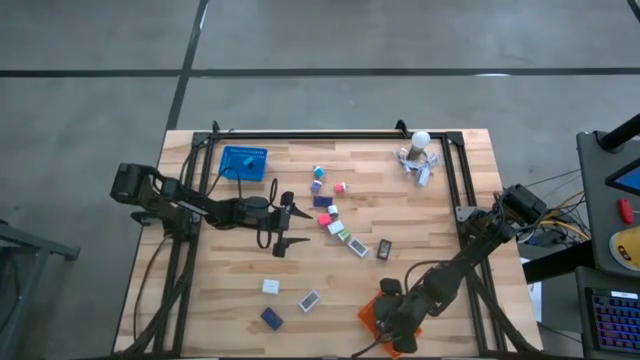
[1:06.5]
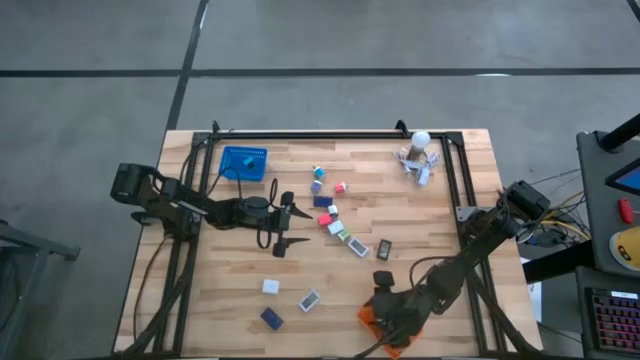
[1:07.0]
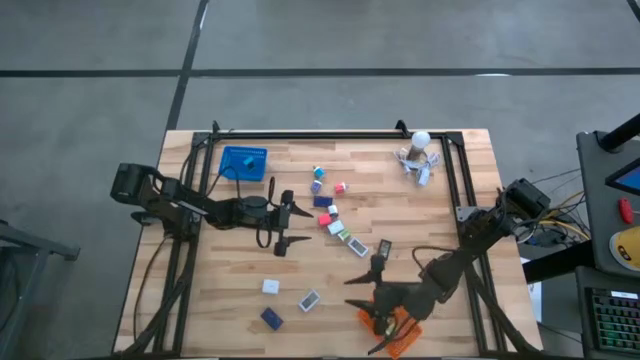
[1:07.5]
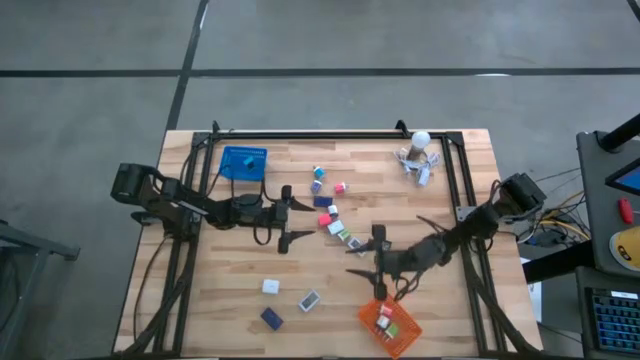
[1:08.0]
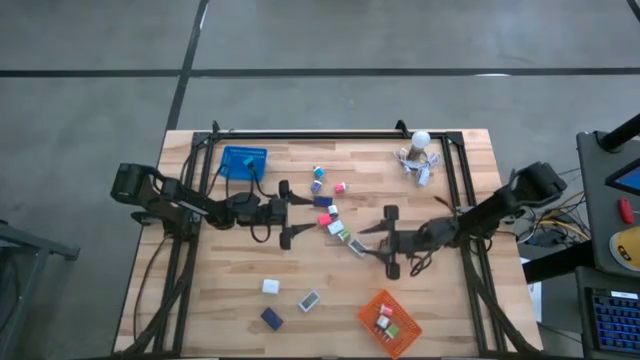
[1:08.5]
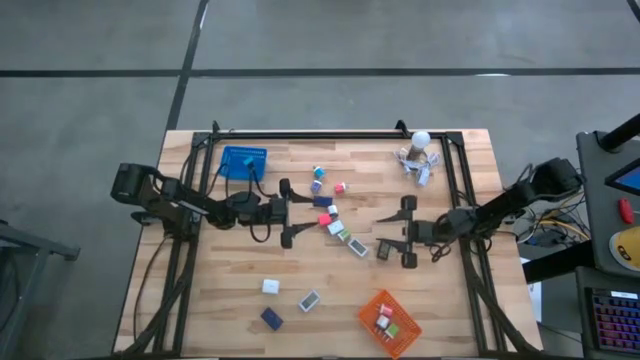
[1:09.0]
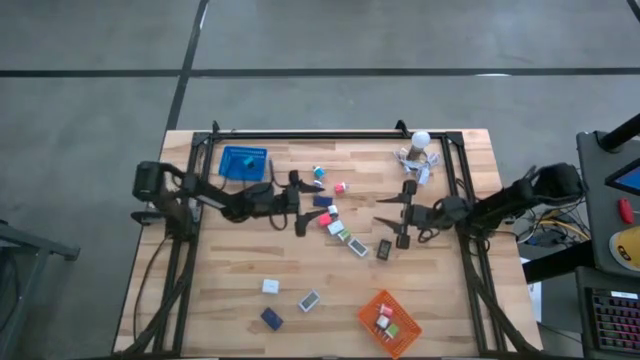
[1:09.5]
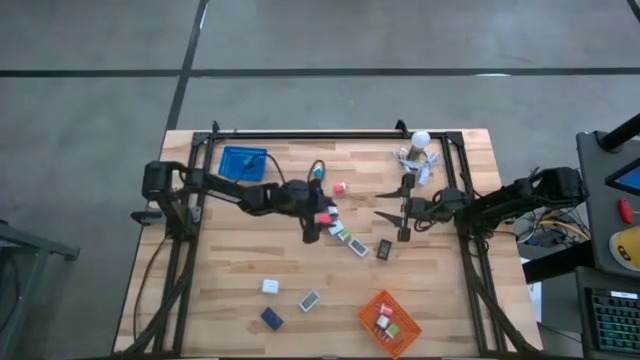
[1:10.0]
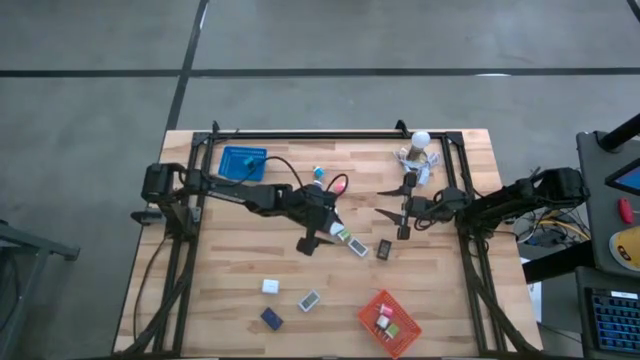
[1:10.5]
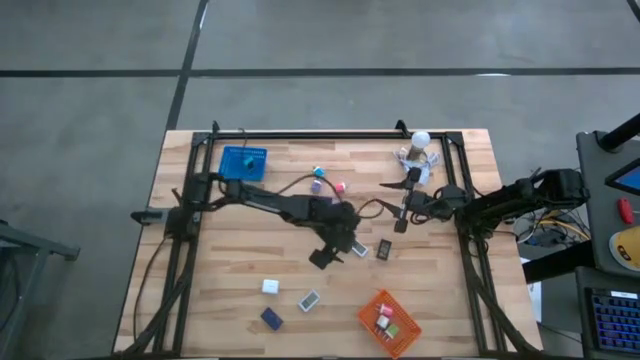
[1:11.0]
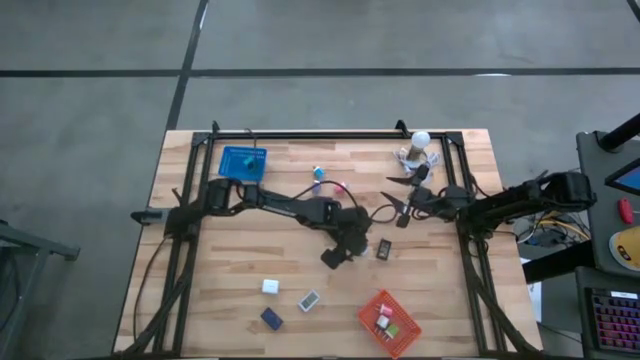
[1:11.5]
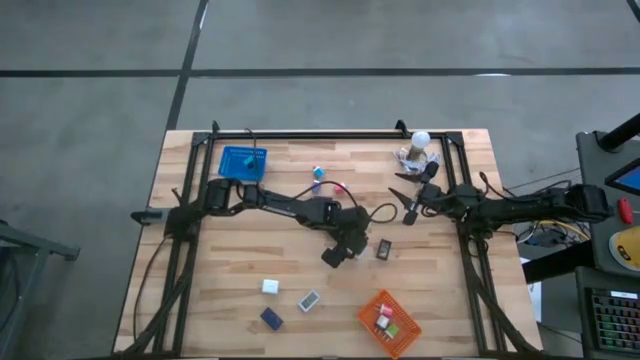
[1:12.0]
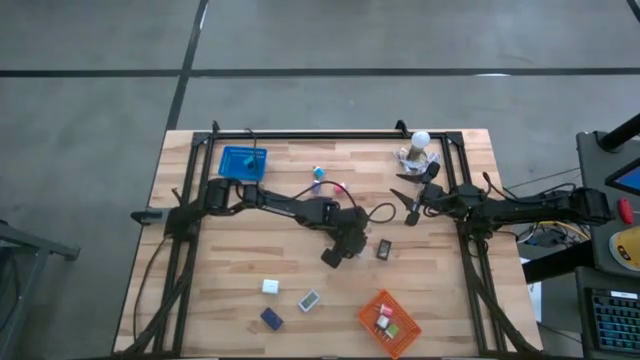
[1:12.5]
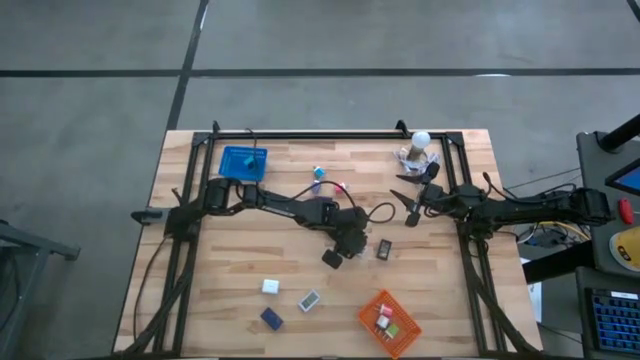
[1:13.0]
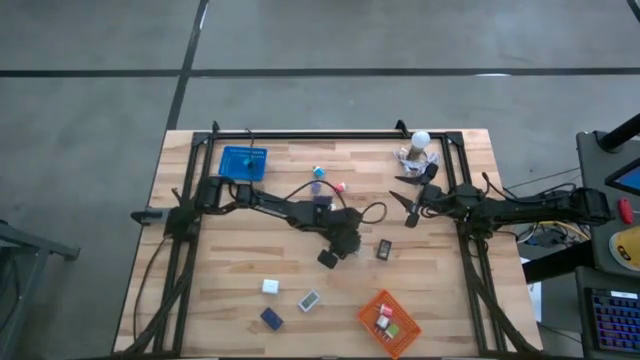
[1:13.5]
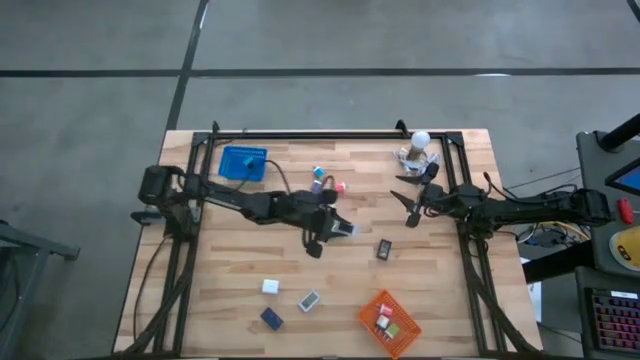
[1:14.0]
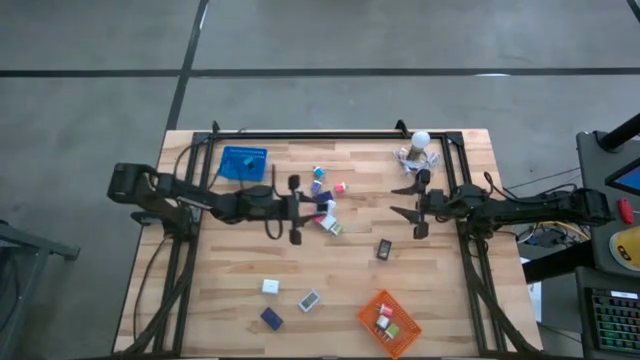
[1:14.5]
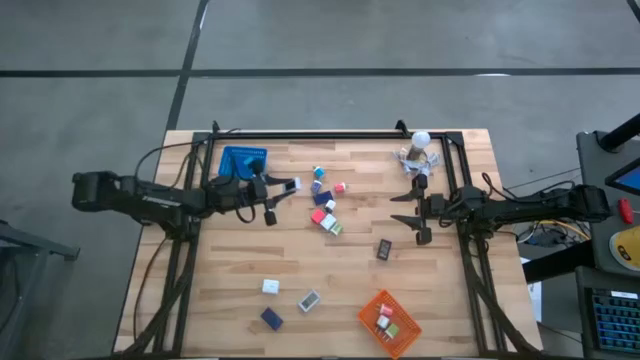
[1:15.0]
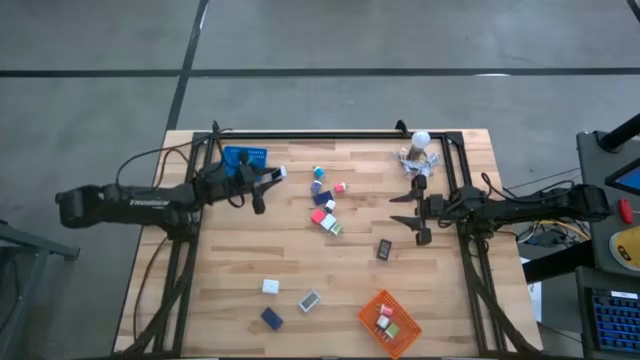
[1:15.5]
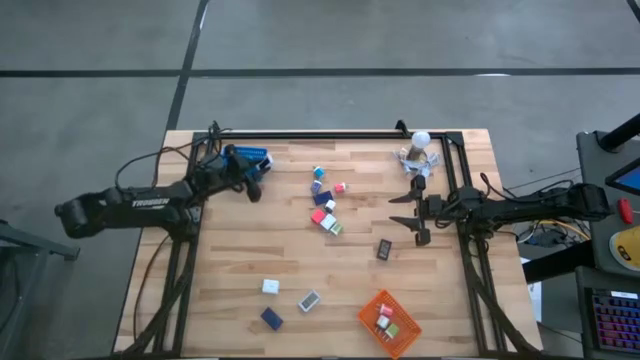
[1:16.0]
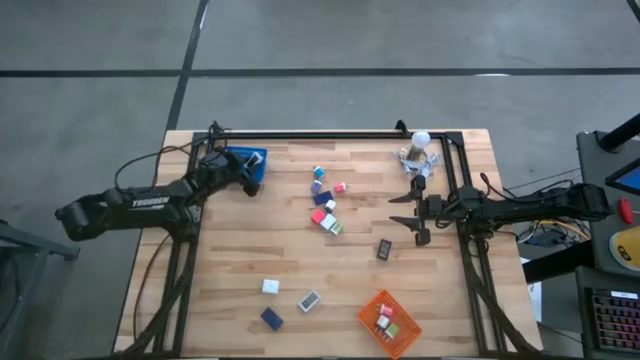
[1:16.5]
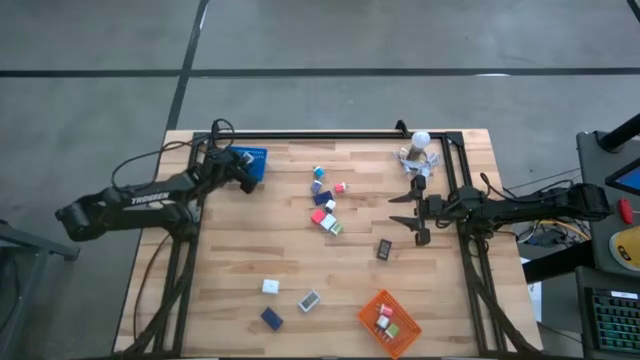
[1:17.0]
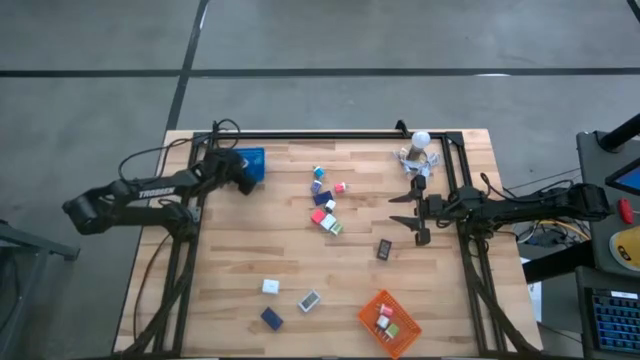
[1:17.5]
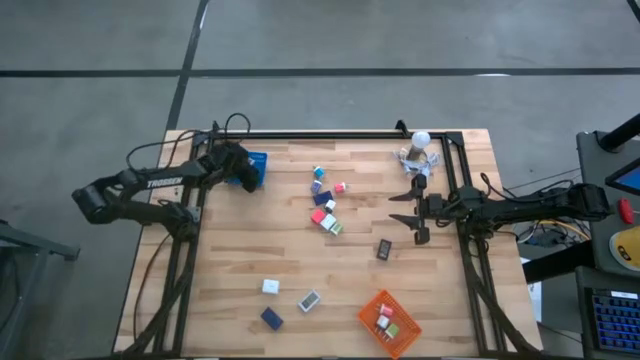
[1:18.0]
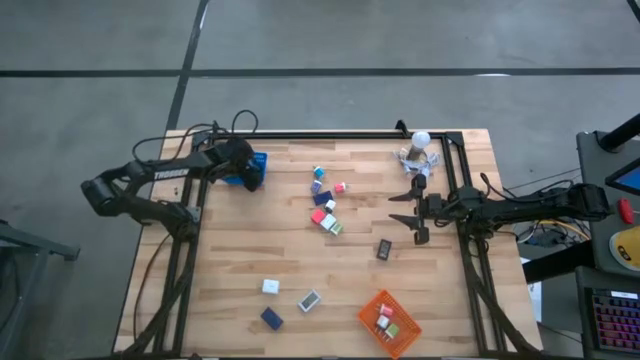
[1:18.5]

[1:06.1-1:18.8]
Task: Pick & Place Office items
Put the top white digital clock into the blue bin

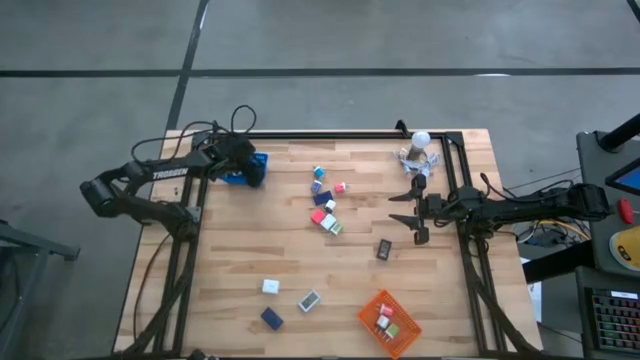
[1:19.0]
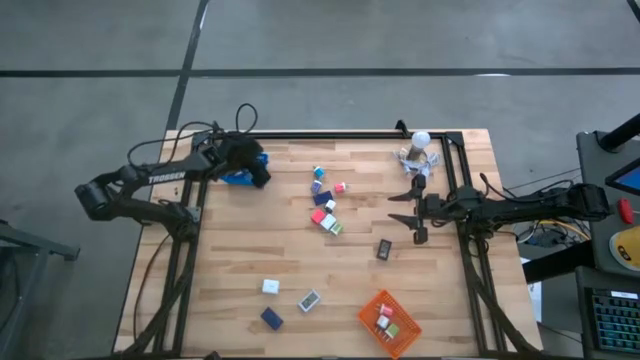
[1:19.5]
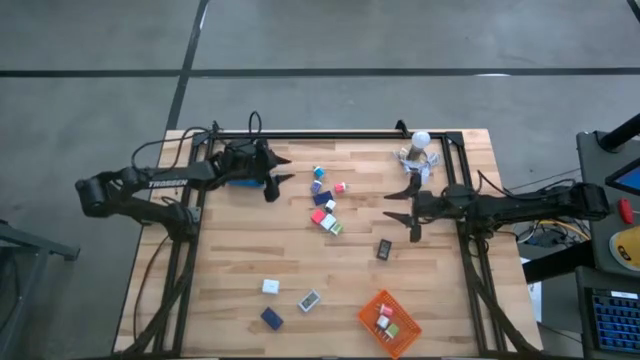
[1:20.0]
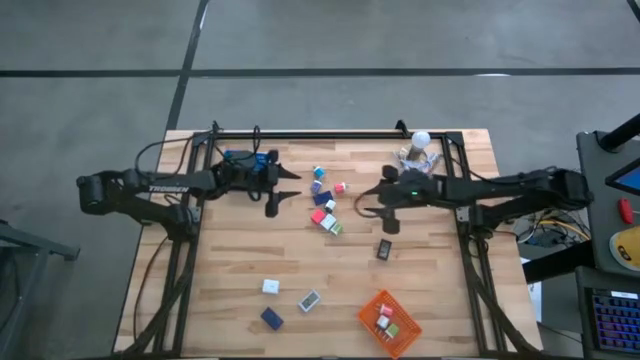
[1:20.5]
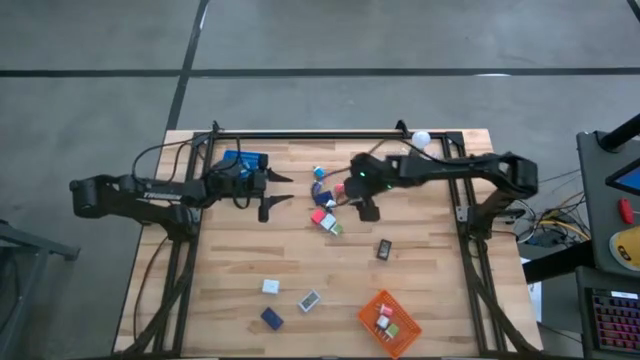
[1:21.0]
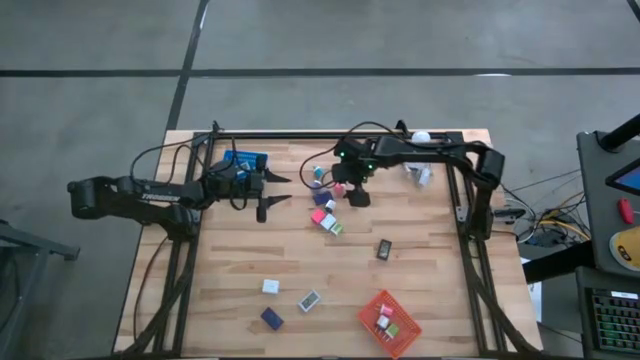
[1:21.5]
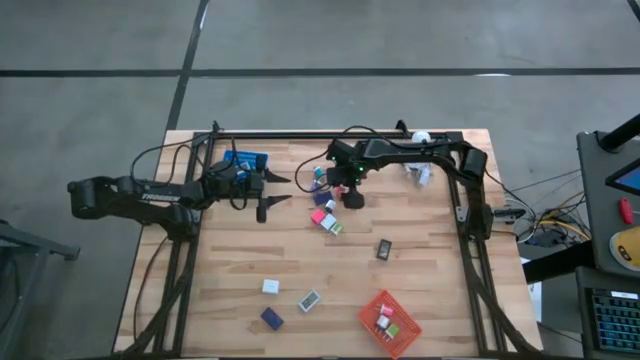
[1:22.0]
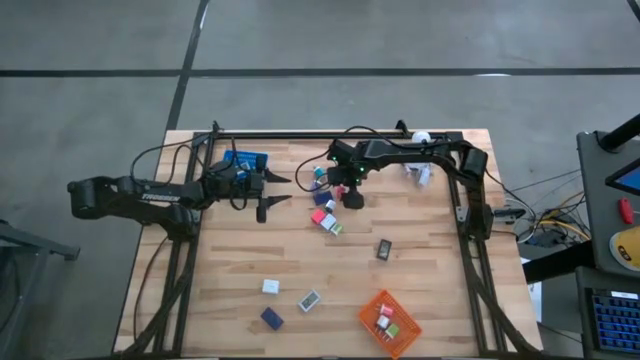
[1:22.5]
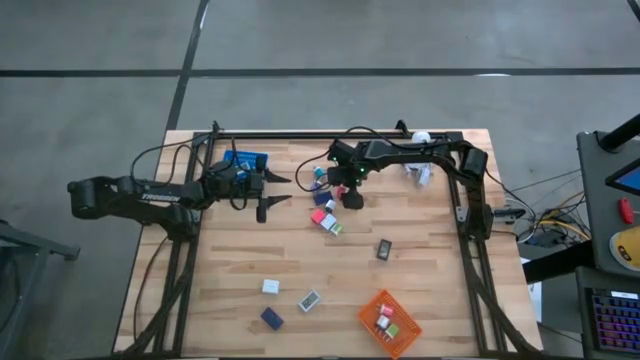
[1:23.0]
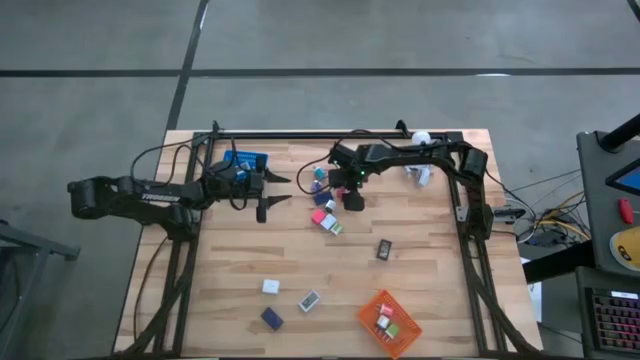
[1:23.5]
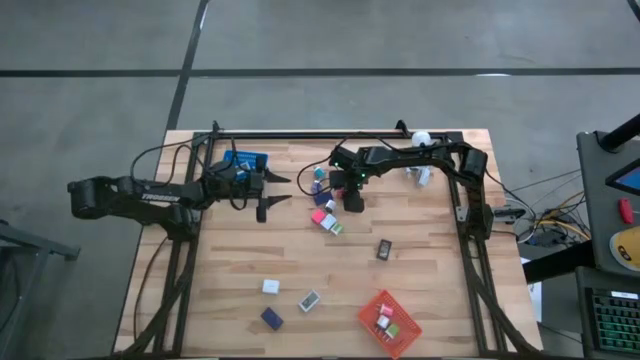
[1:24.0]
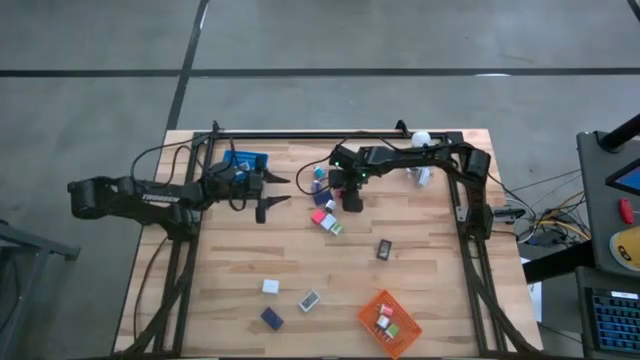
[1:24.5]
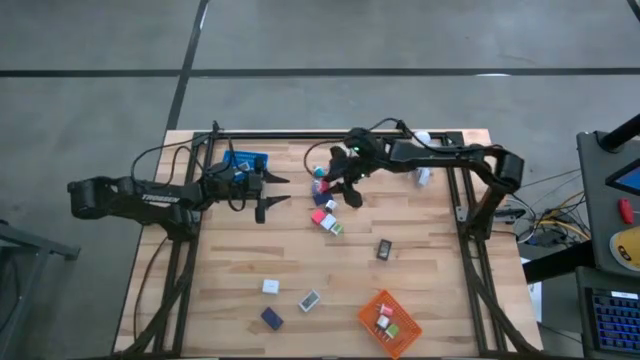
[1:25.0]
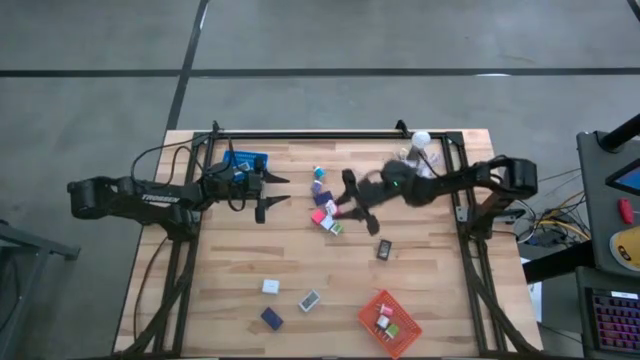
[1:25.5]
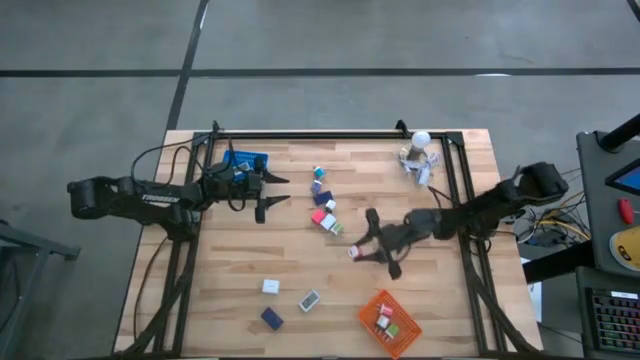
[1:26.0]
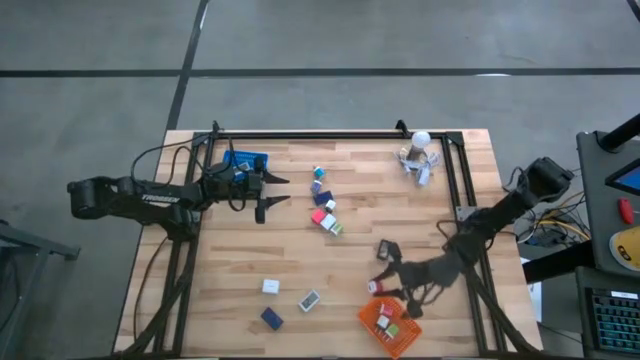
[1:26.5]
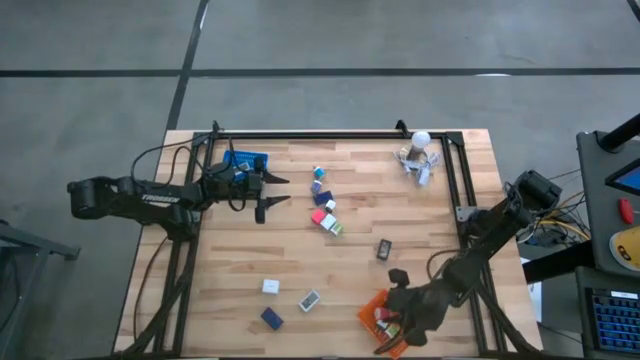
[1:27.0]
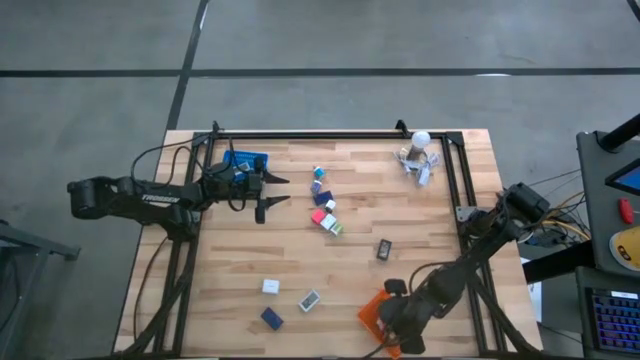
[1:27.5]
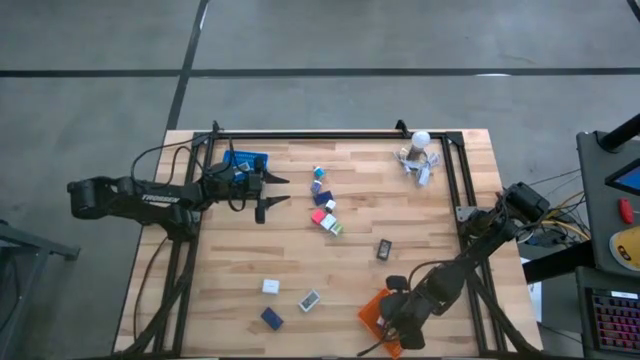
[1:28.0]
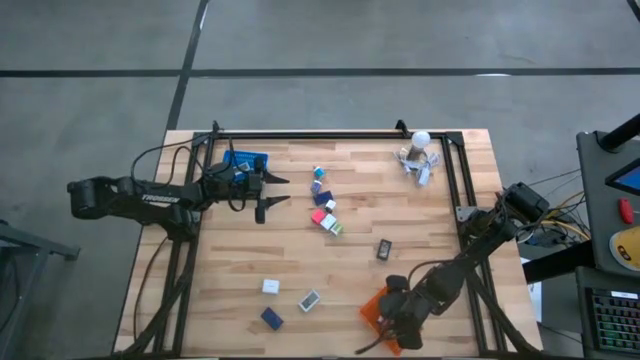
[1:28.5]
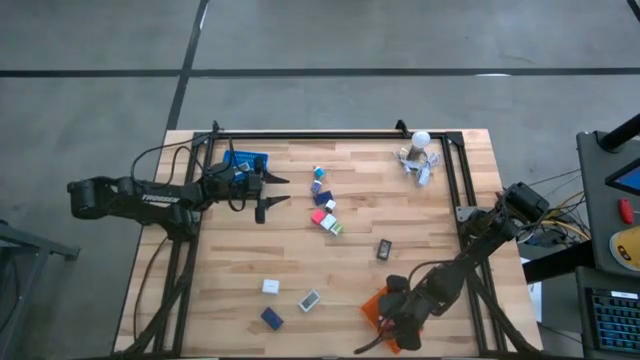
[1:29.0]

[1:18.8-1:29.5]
Put the pink and white charger adapter into the orange bin
